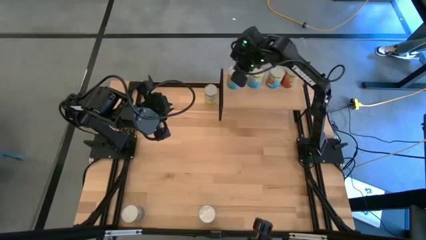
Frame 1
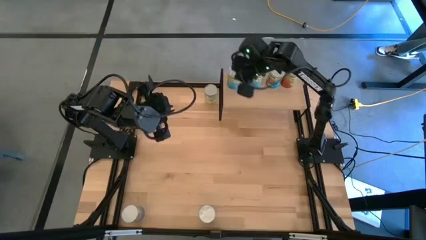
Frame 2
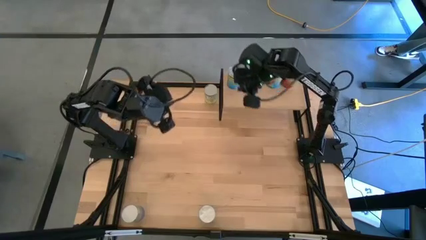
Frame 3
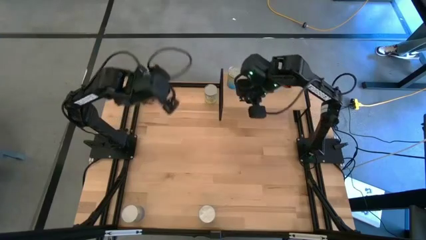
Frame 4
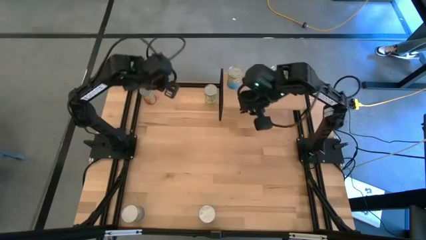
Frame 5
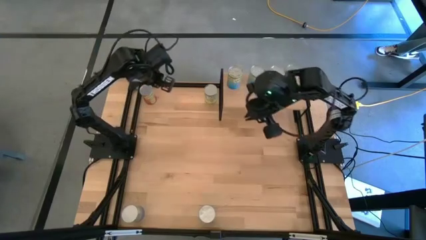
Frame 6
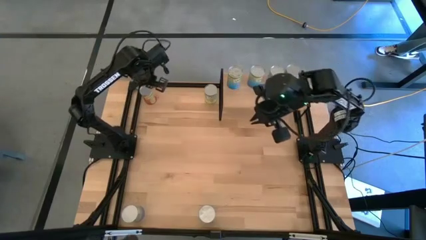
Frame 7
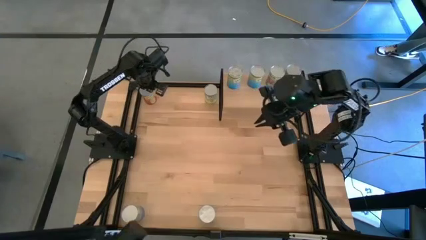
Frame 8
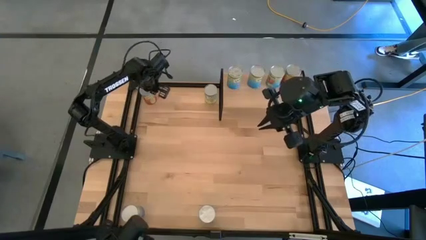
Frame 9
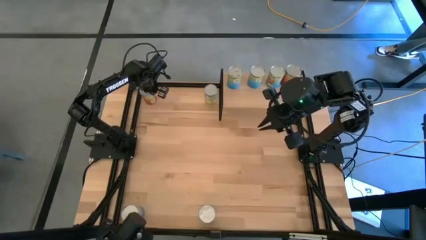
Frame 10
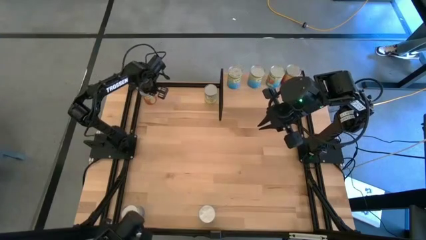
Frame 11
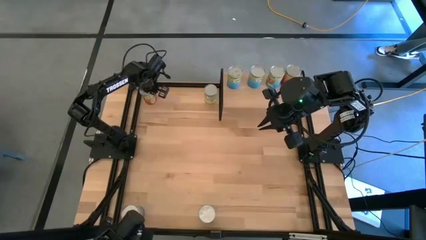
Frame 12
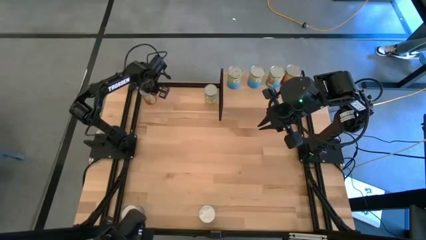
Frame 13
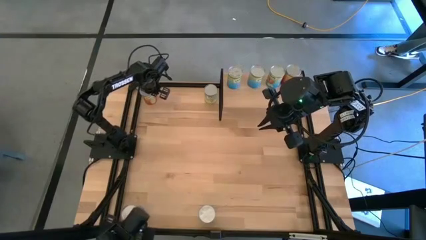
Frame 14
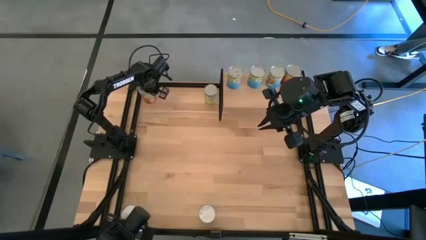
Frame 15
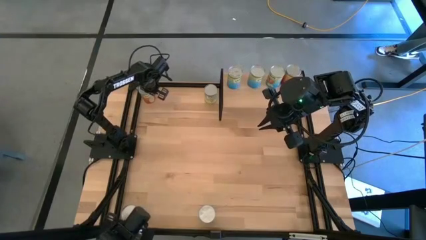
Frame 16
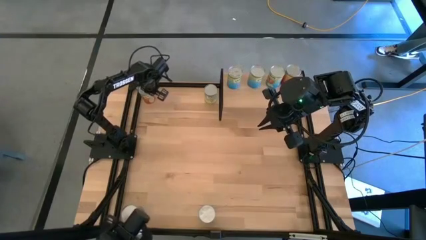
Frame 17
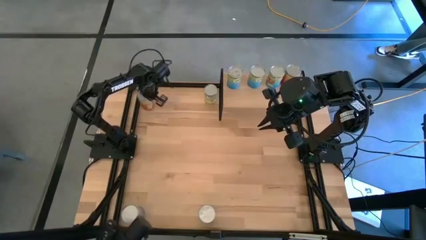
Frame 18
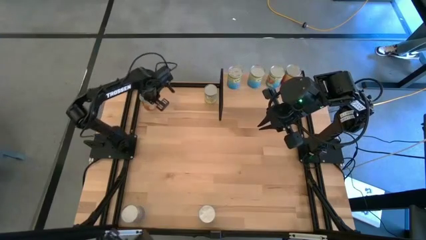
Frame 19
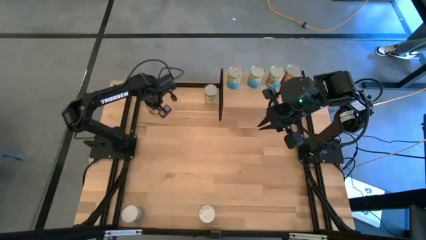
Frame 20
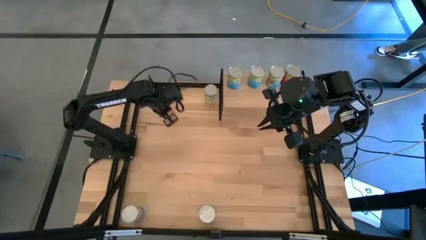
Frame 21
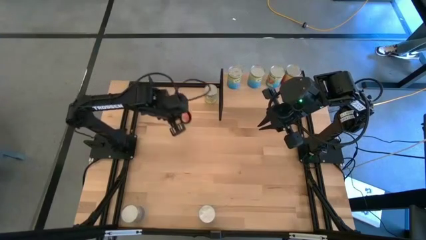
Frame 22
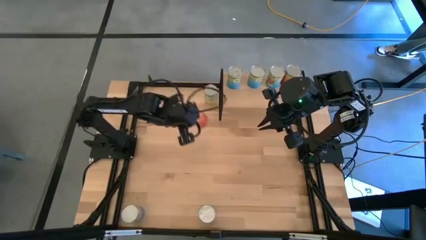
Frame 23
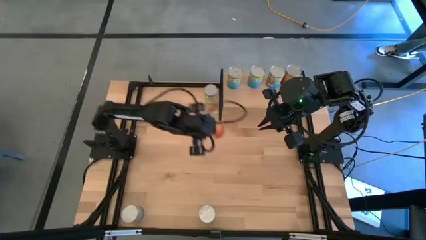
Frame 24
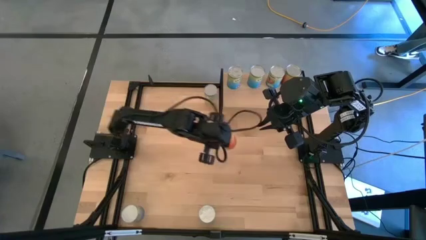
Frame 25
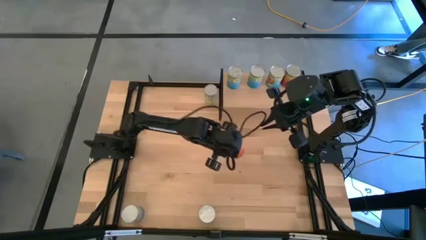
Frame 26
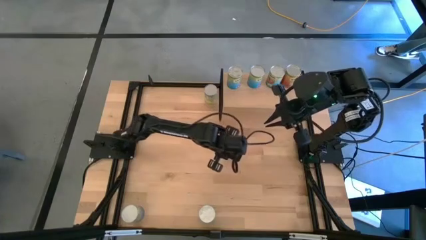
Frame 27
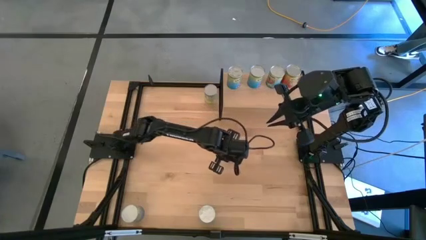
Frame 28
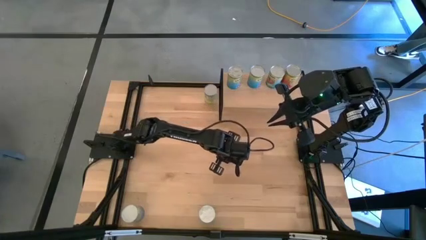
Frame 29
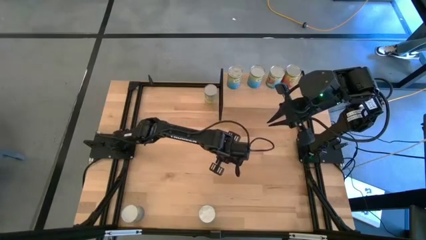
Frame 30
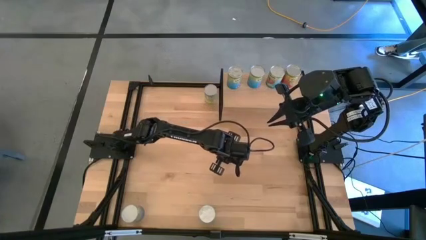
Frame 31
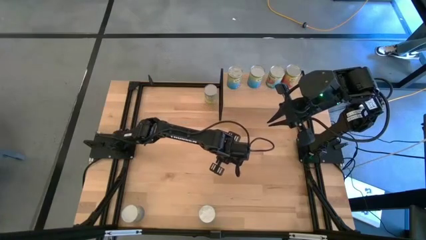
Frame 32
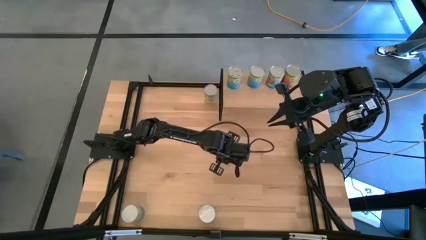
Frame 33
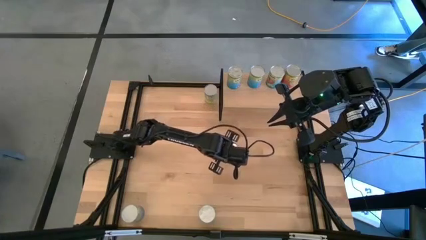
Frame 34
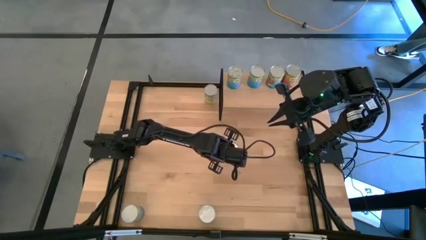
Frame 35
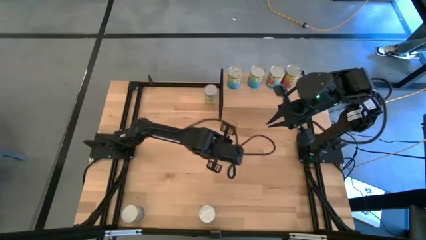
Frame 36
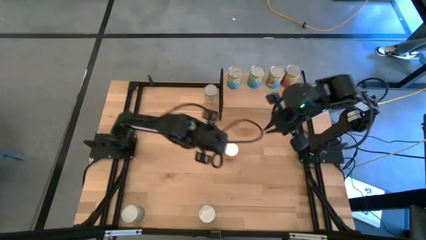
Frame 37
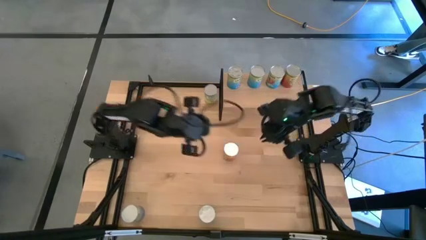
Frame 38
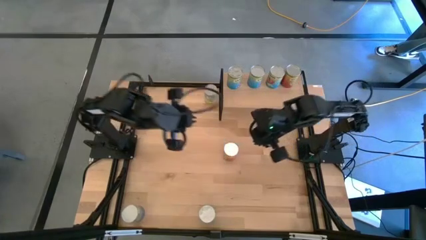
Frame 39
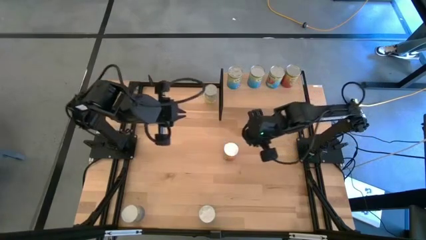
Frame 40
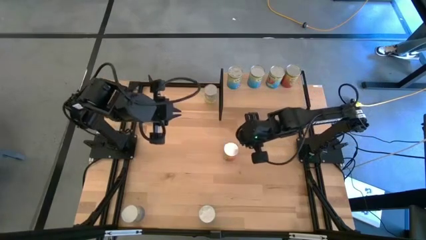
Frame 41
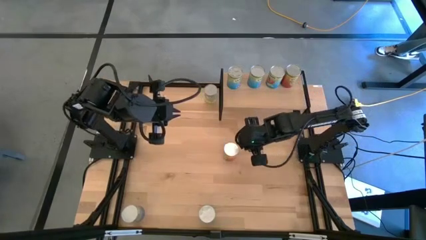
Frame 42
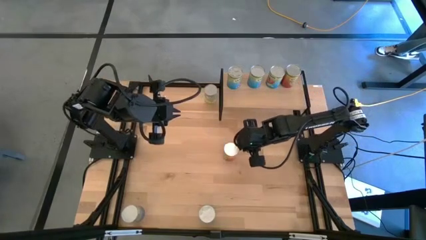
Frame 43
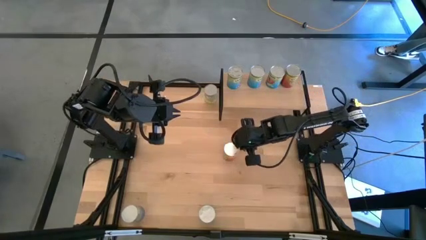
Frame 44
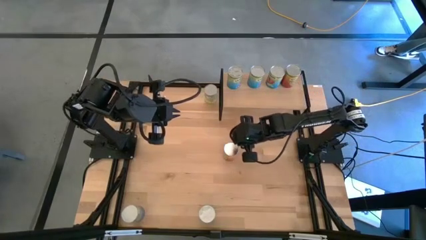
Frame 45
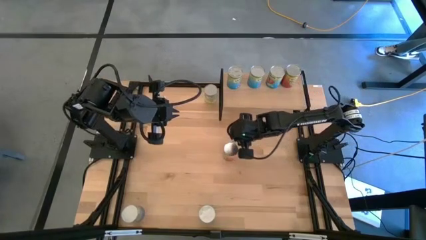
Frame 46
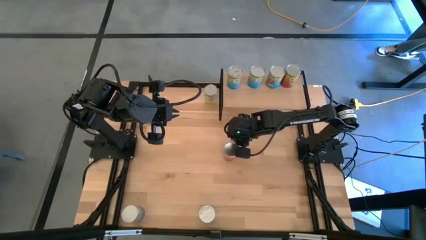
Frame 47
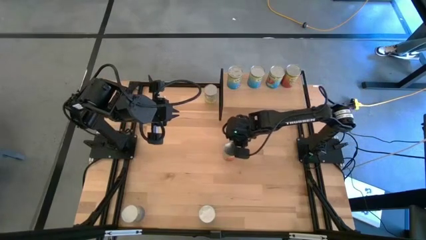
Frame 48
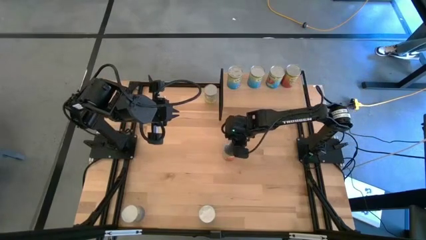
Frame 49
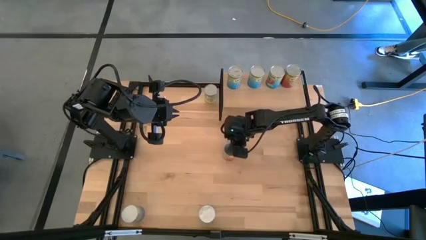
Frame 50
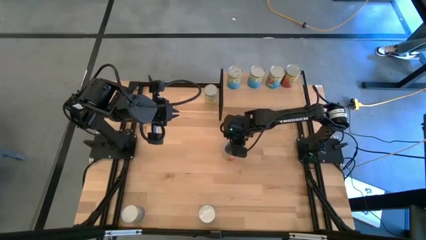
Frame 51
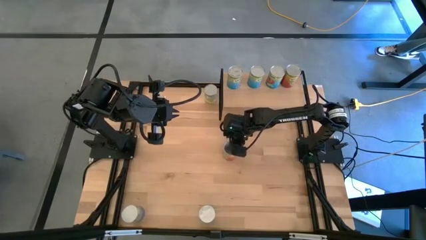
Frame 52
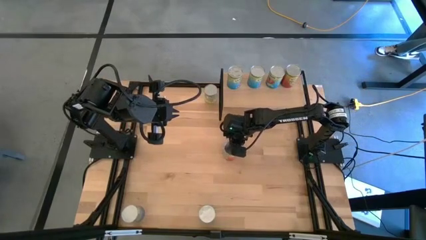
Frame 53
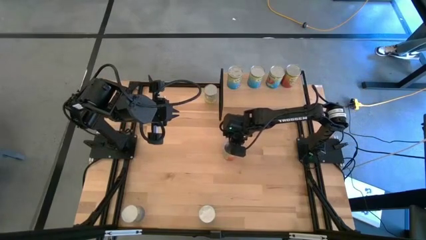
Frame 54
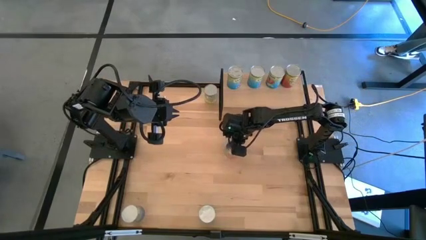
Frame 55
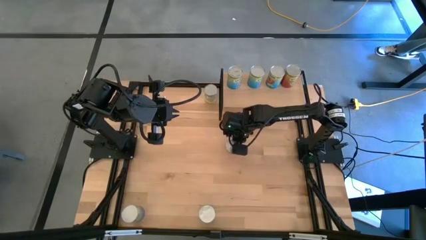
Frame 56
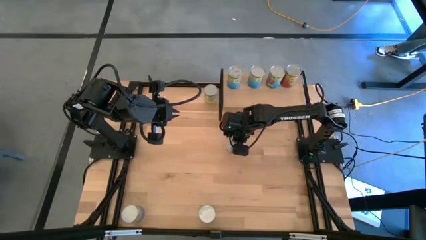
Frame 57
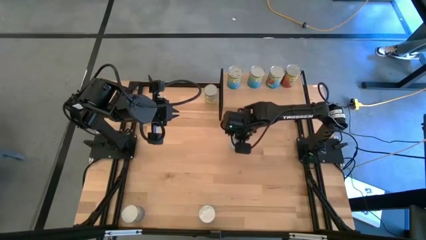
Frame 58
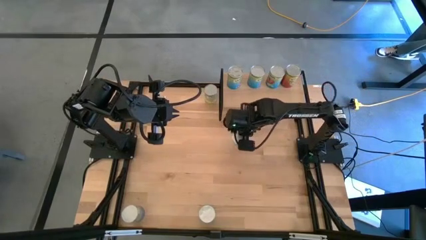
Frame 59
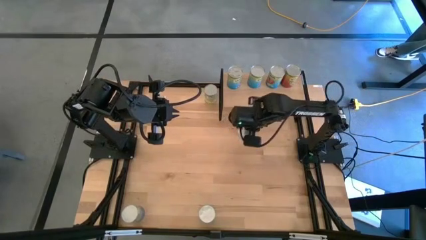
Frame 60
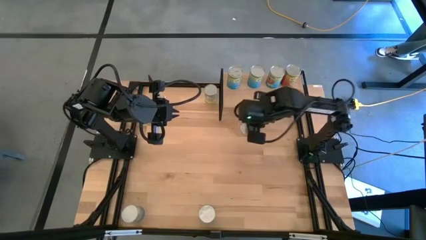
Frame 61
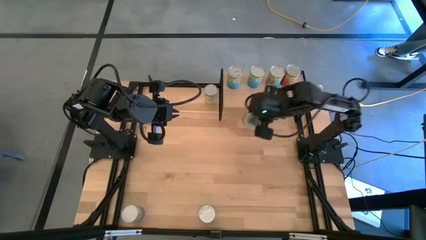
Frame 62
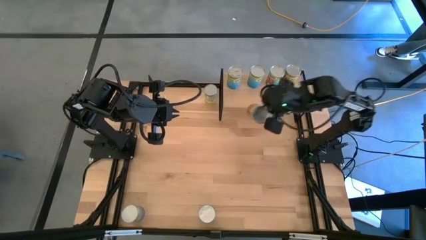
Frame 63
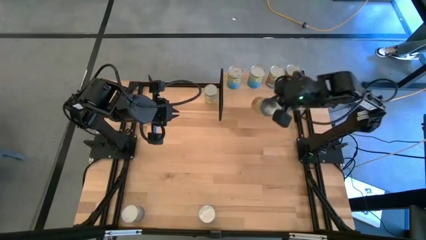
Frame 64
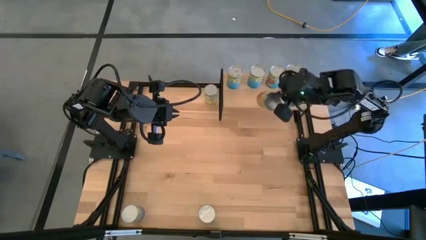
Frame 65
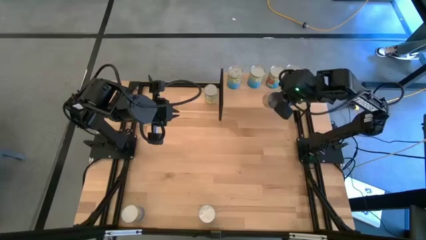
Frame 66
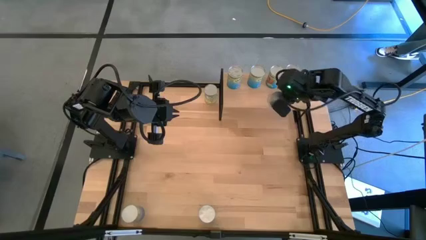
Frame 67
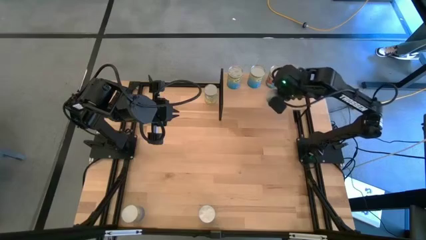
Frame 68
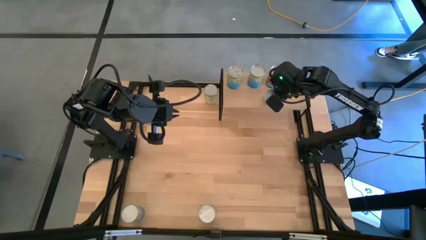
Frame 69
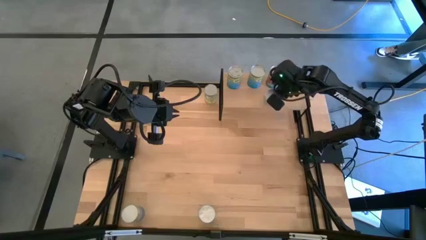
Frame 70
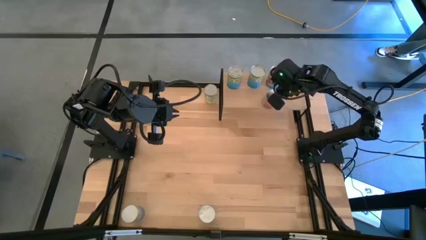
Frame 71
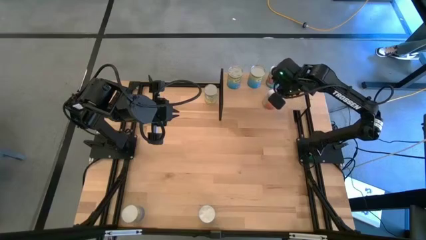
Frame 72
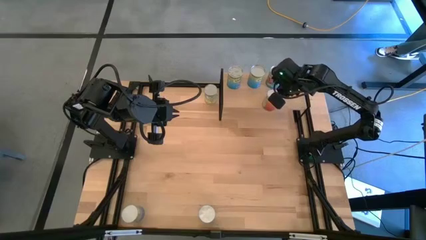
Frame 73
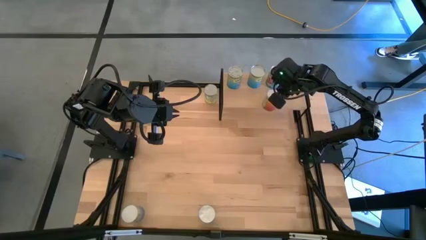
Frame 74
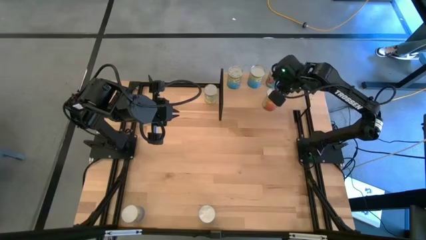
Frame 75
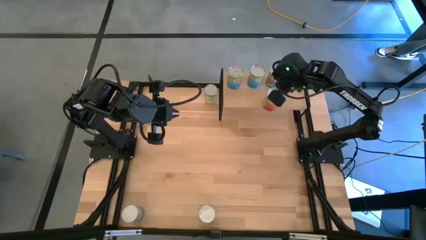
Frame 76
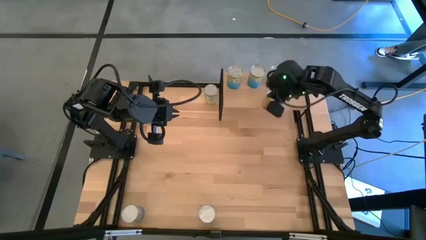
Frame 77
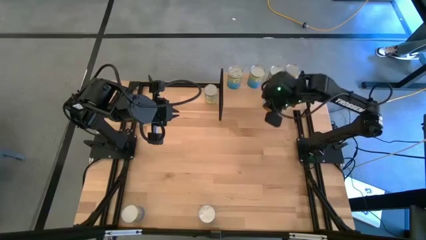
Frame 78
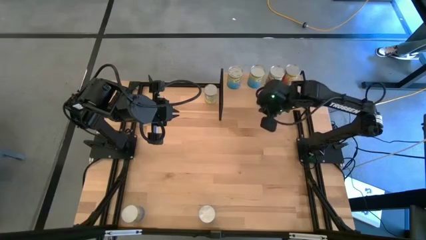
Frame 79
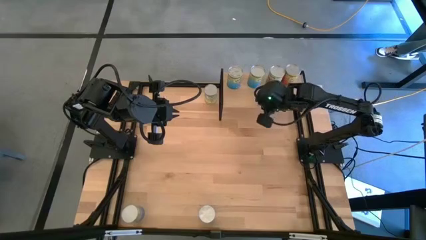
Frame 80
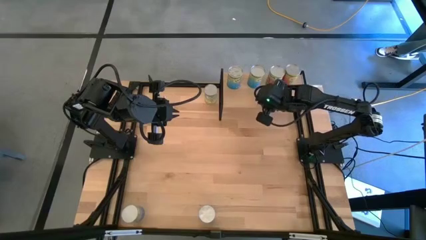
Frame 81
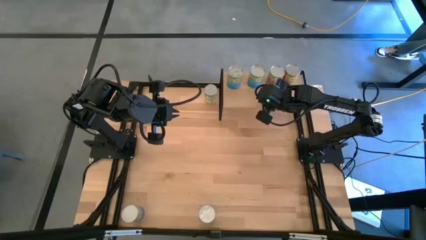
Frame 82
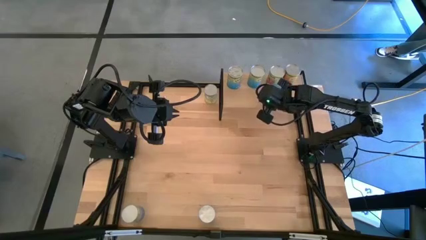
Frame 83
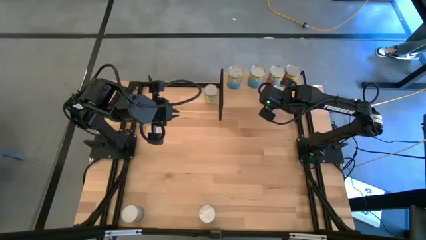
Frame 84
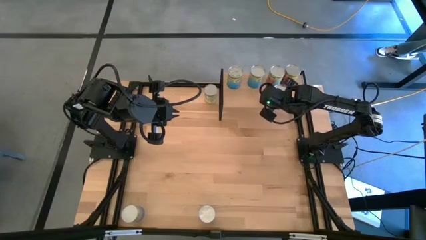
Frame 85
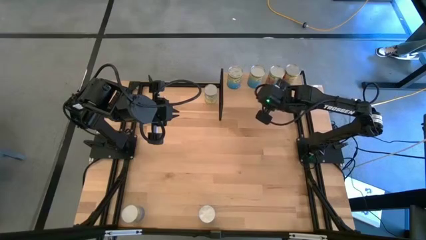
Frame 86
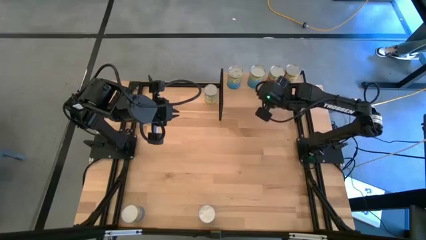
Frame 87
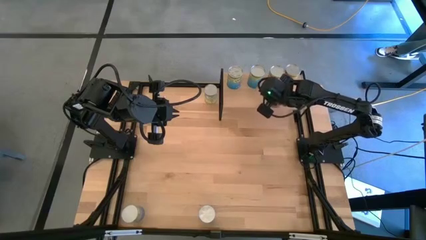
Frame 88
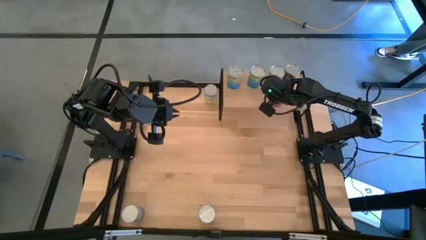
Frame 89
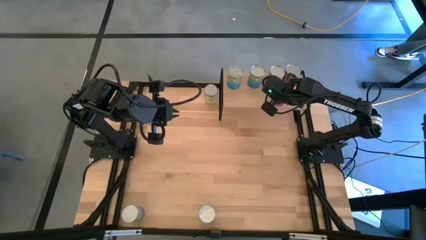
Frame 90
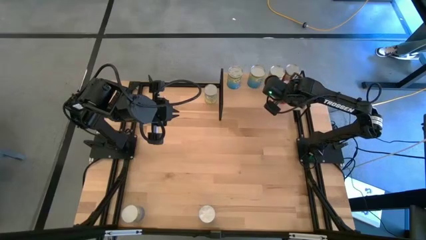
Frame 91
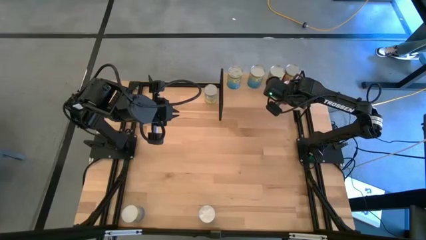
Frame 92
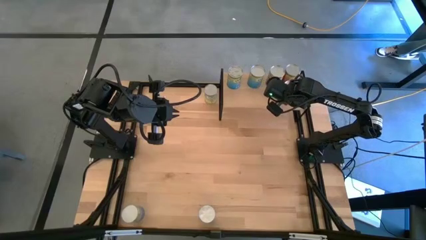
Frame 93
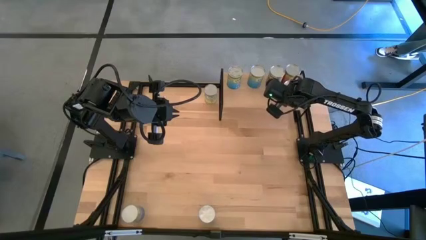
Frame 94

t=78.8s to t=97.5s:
Task: Pick and place cans onto a shelf
Put the canned pineapples on the shelf
